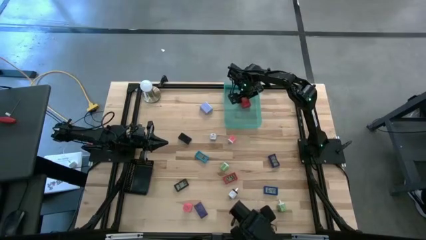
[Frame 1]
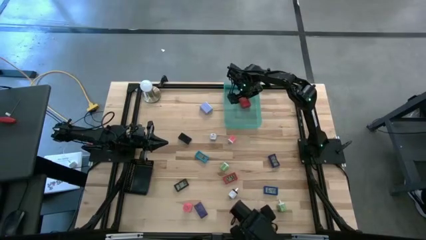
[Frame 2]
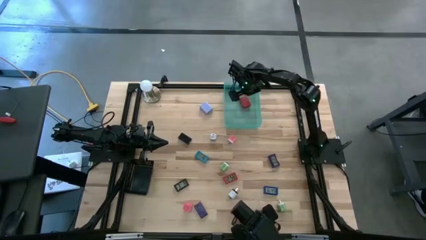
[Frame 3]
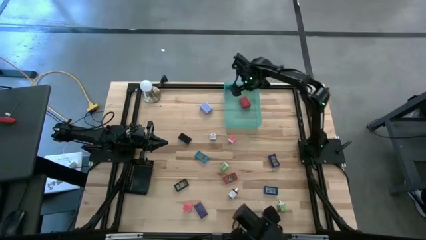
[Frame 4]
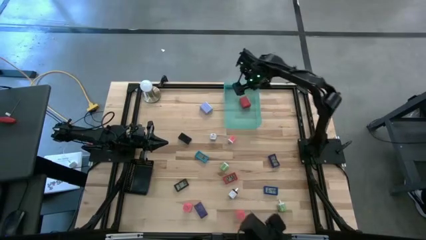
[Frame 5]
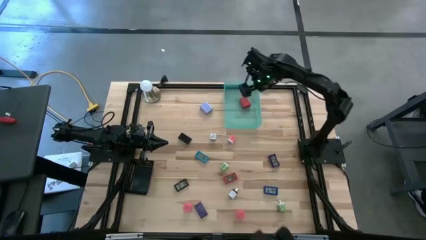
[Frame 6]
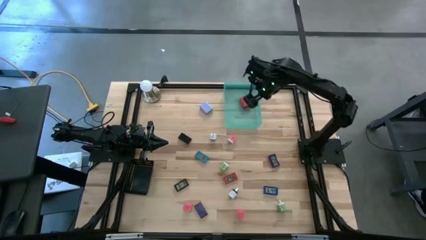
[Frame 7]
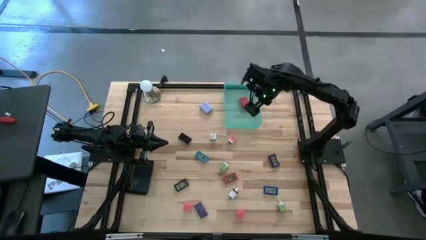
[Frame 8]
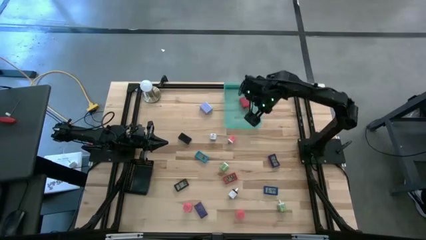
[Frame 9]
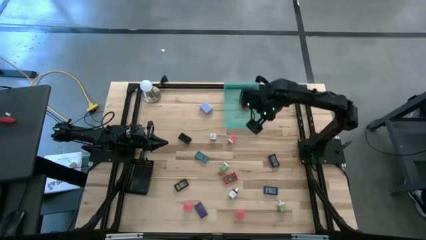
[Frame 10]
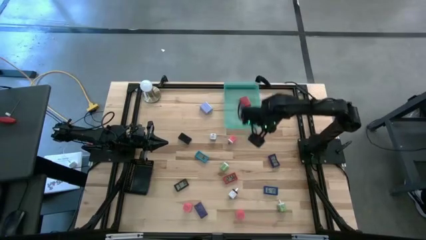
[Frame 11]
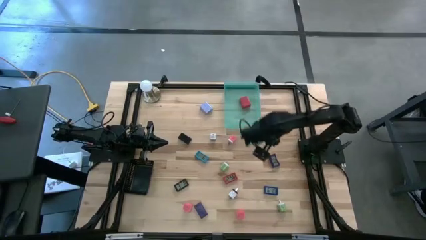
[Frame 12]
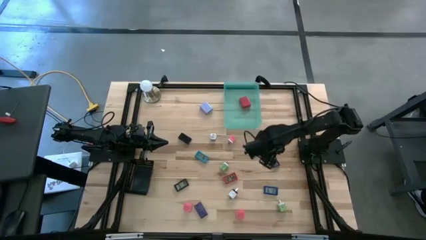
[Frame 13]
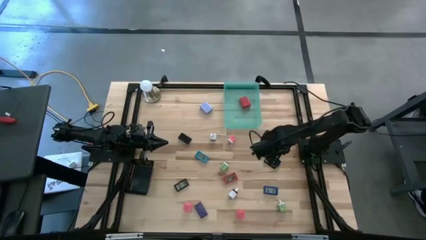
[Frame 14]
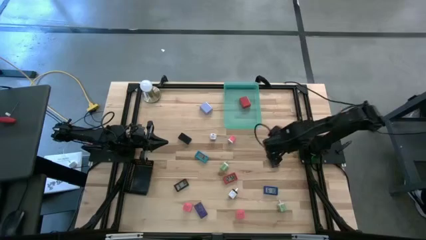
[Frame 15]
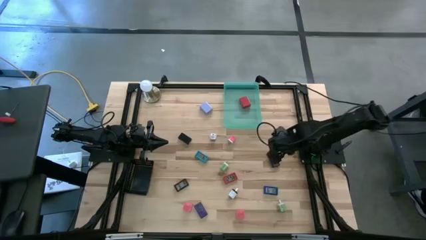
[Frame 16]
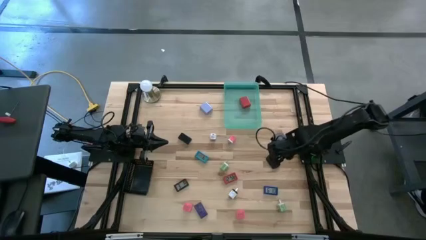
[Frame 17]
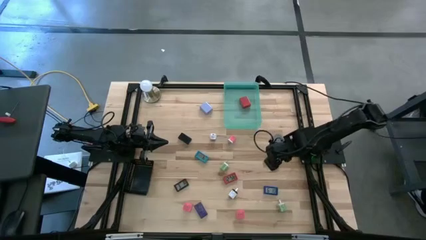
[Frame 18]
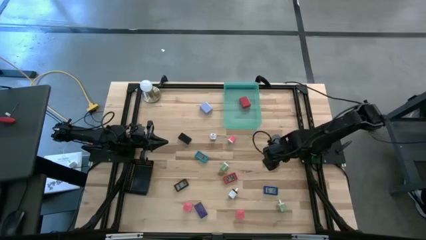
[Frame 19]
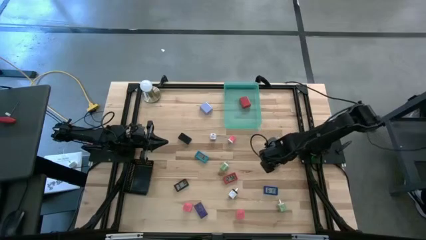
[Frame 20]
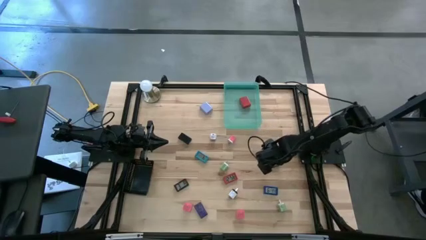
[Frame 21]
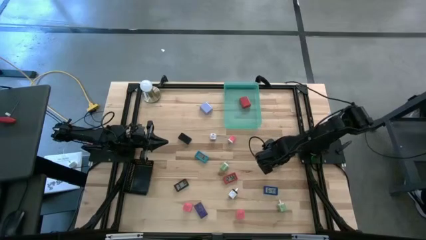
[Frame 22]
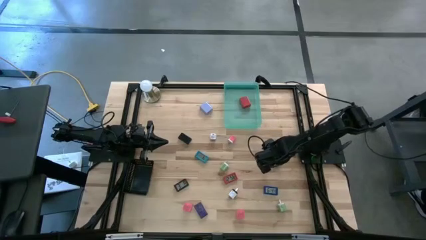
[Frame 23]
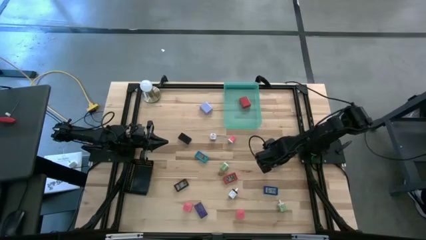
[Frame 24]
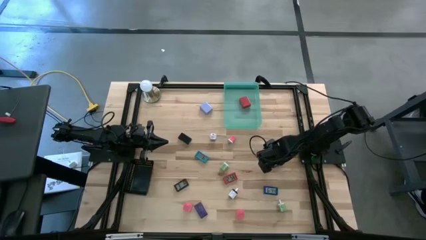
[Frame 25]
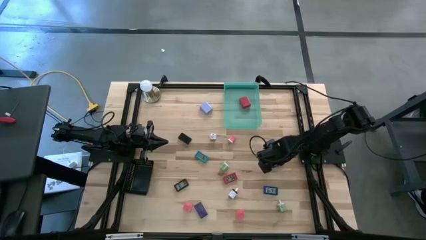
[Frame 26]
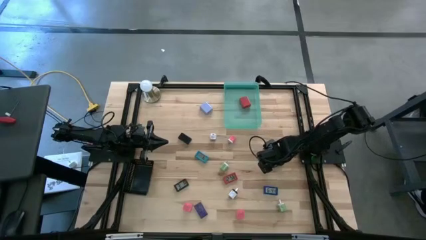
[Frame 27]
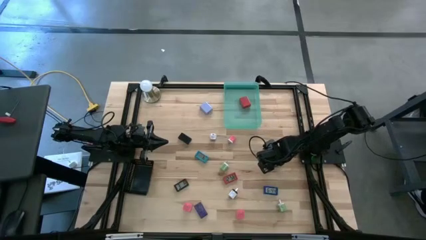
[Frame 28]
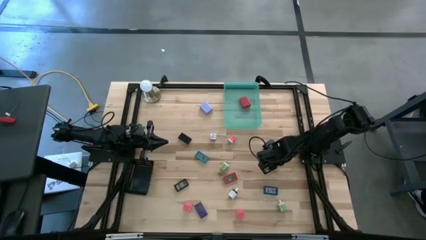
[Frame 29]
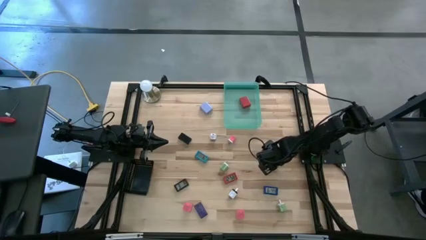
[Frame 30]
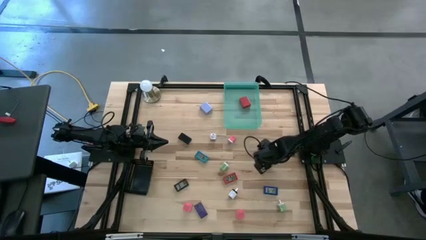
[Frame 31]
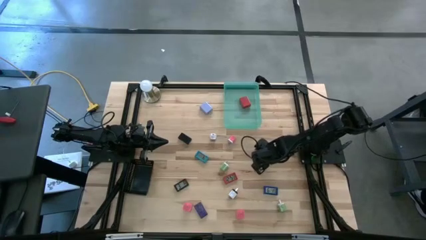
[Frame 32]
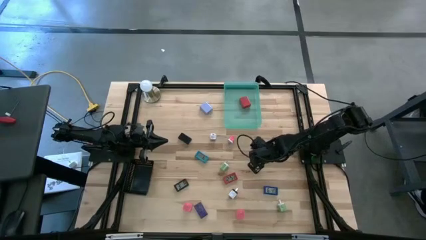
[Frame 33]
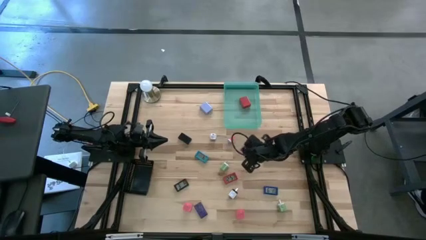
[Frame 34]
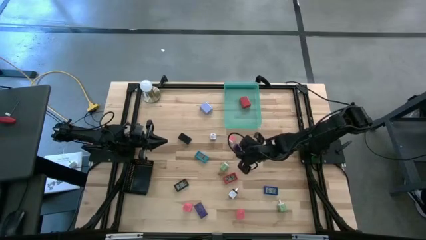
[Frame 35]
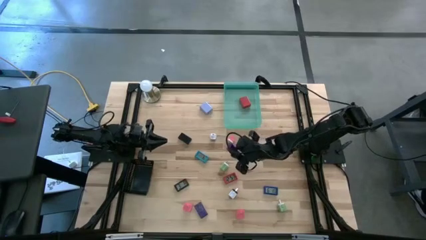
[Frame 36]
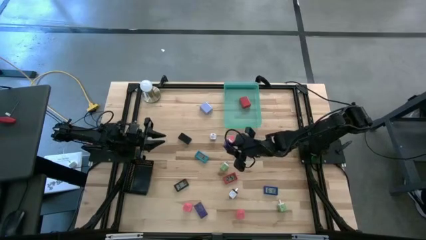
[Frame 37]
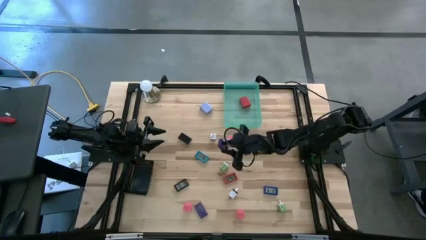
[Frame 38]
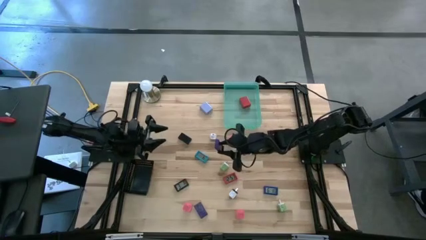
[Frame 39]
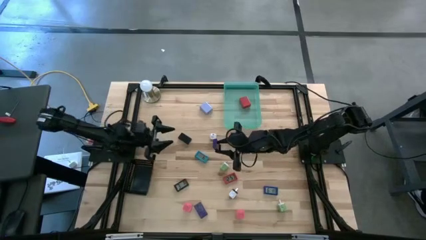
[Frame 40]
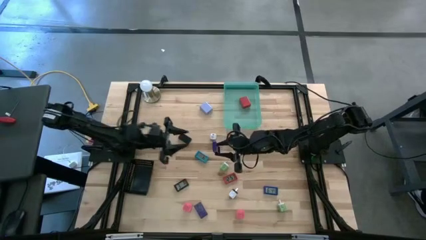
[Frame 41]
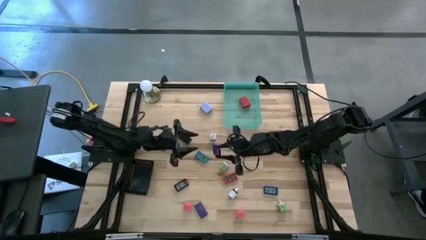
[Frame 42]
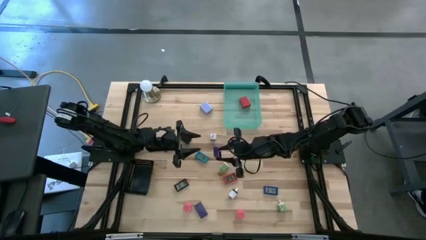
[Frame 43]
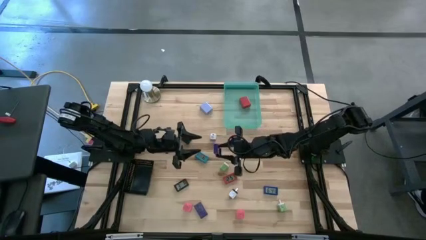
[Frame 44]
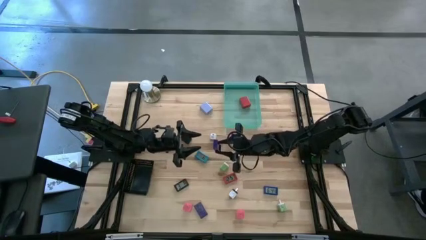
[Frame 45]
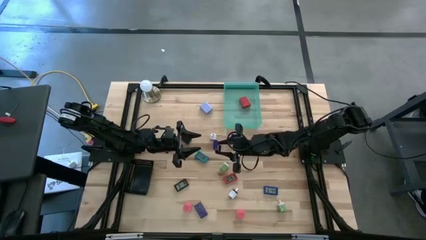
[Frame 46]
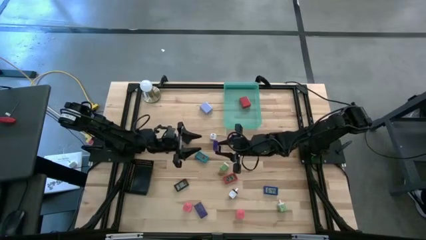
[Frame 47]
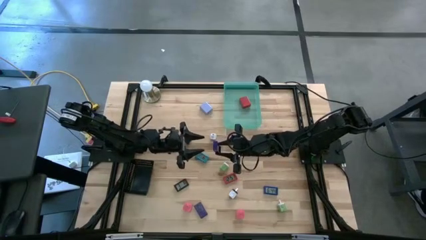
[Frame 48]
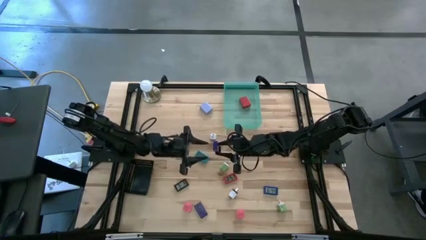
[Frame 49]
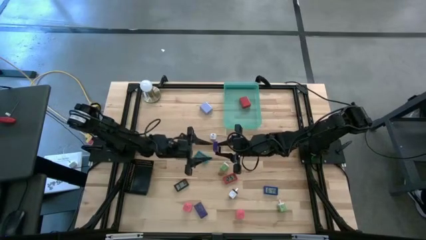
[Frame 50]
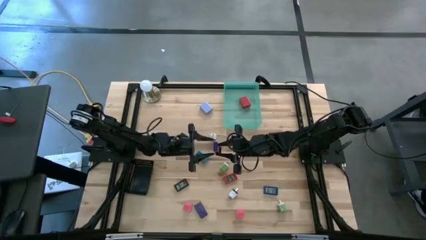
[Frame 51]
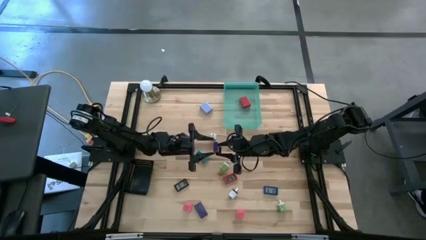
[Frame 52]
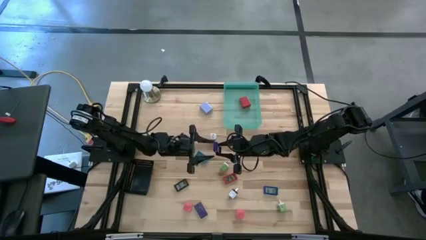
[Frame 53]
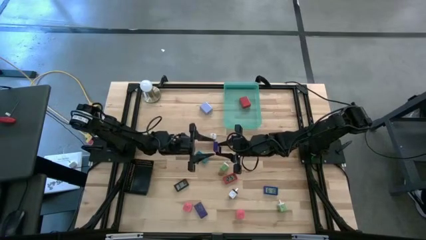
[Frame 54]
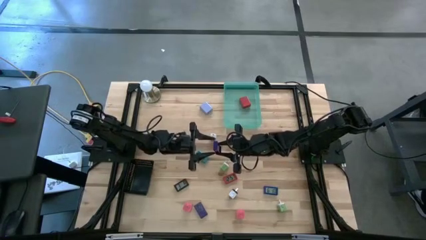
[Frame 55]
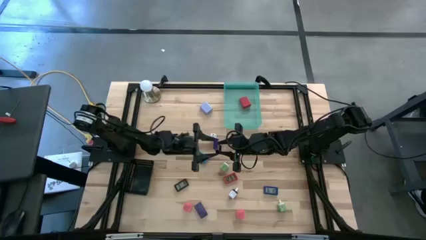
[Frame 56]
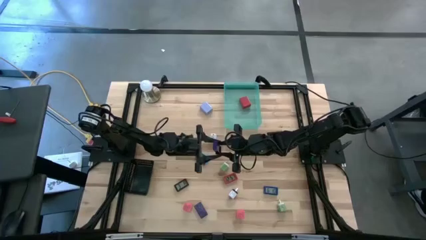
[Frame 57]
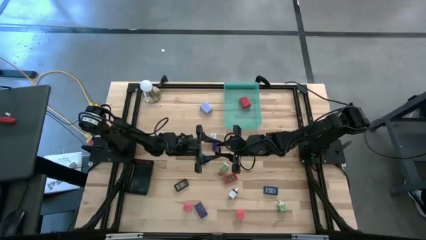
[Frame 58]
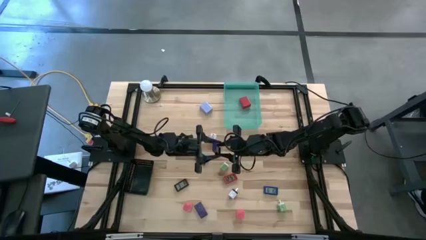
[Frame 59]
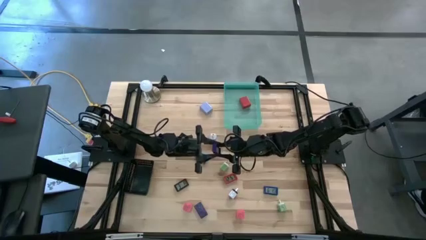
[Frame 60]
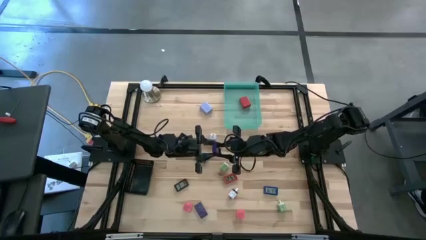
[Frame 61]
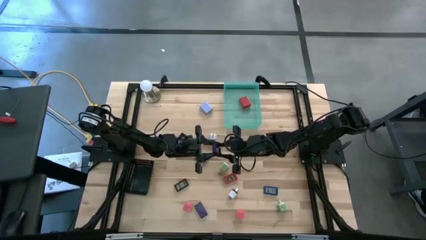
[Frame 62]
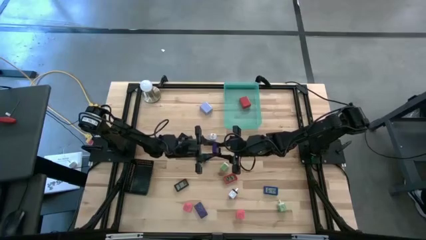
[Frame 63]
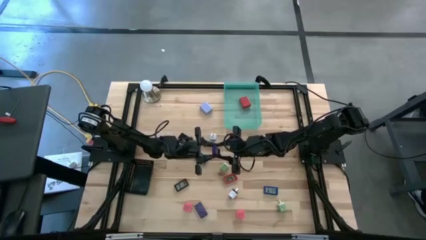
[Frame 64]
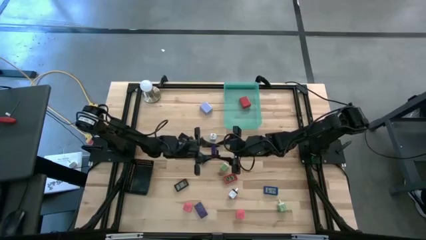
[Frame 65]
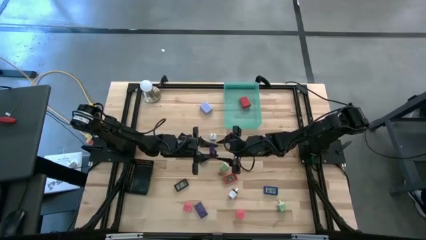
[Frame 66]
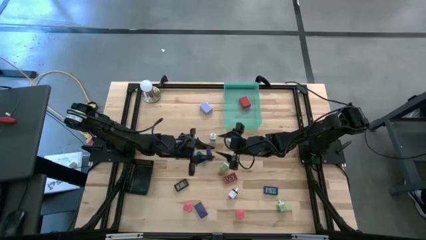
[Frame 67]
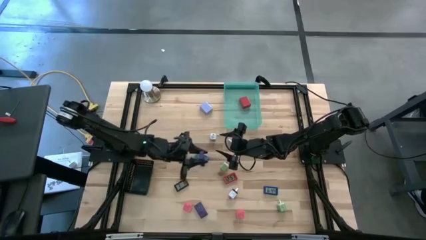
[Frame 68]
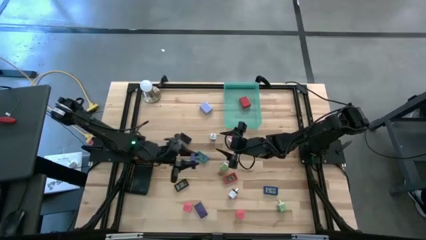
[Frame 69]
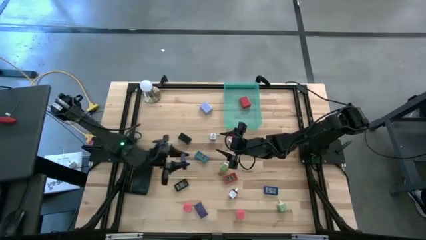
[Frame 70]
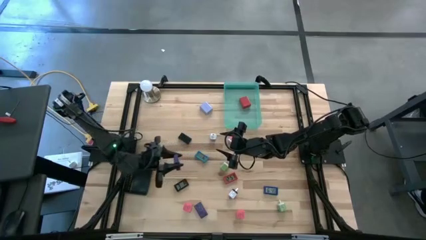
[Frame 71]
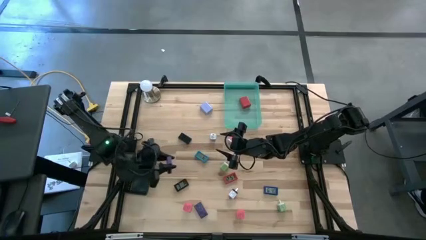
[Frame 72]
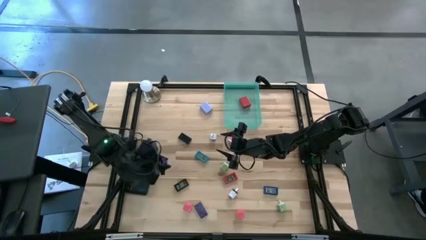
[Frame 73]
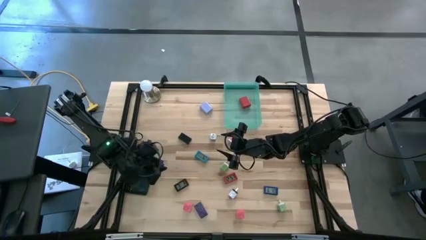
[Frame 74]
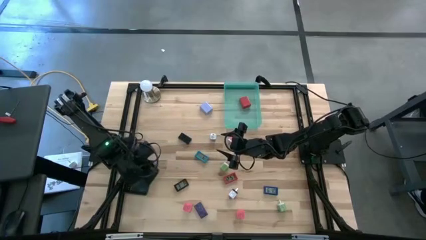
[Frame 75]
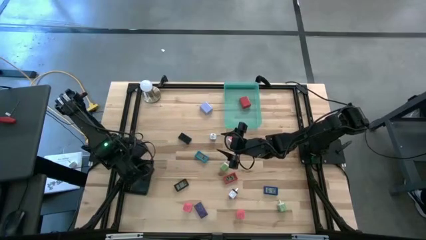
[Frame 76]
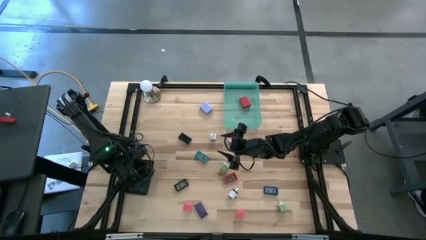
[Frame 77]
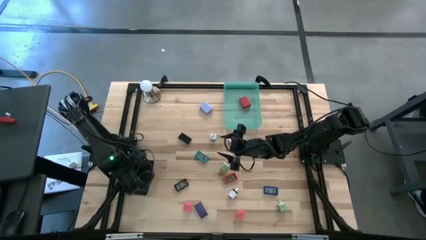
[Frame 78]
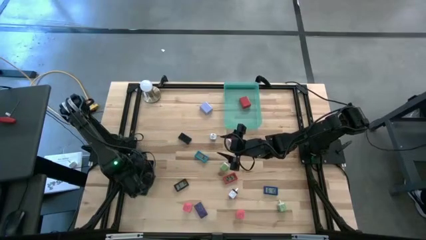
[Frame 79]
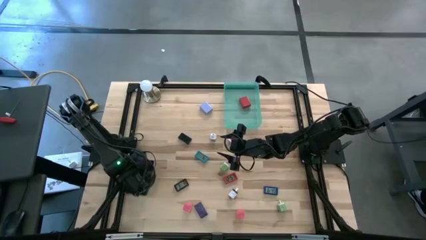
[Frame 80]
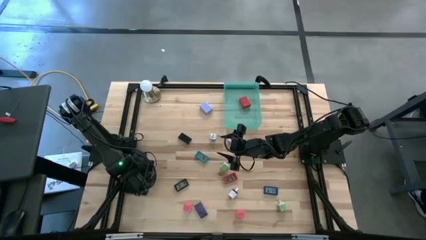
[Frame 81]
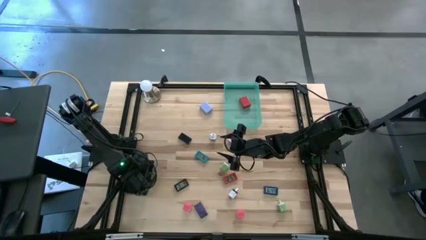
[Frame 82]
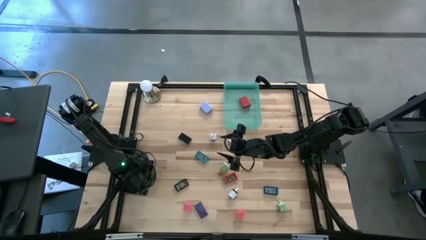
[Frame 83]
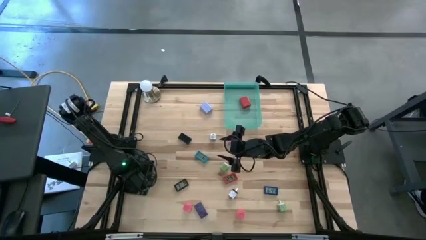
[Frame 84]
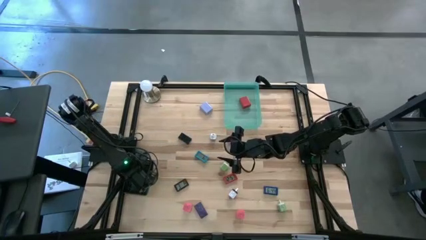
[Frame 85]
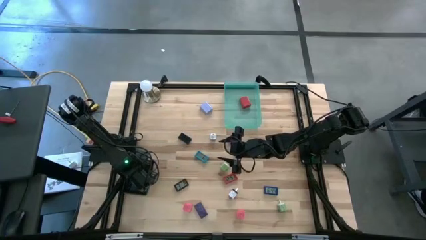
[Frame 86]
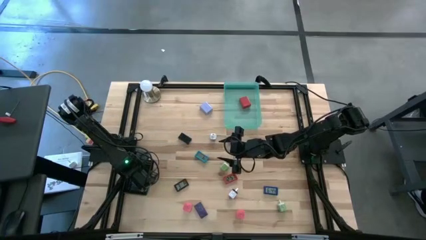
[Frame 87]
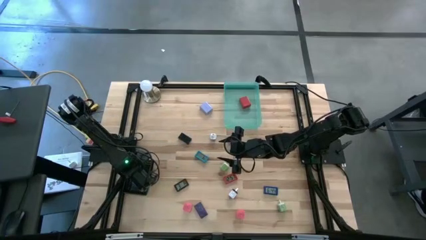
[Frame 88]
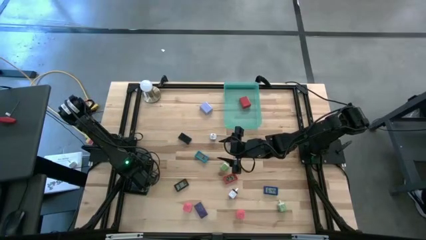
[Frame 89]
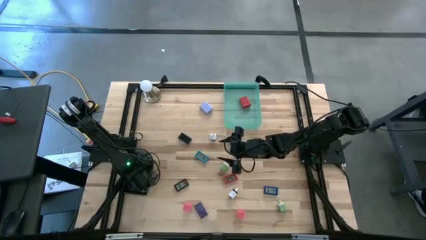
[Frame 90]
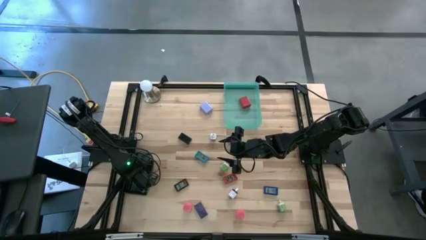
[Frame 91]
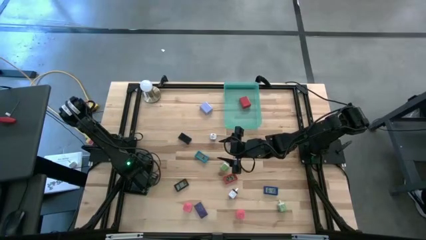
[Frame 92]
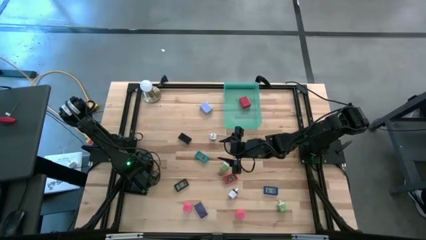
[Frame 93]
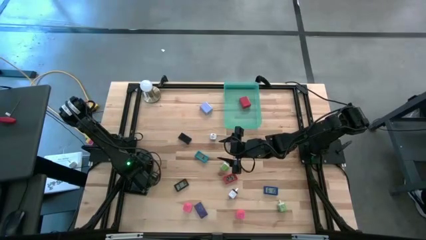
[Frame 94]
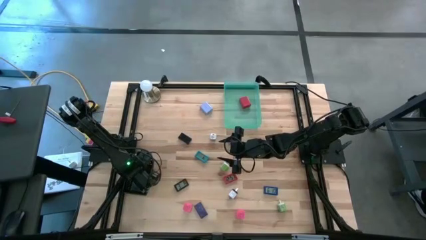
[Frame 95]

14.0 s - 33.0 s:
Task: Pick & Place Office items
Put the top blue digital timer into the black bin
